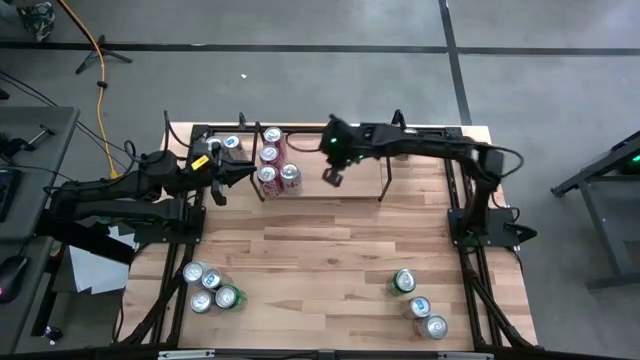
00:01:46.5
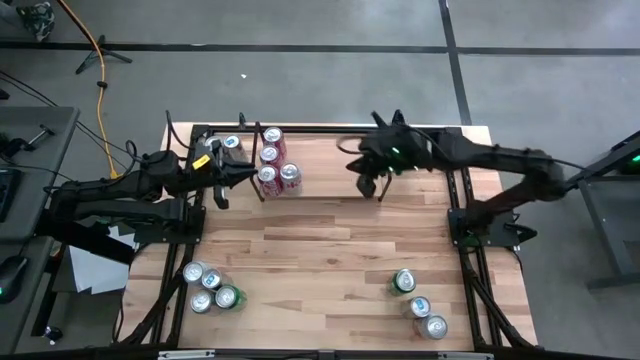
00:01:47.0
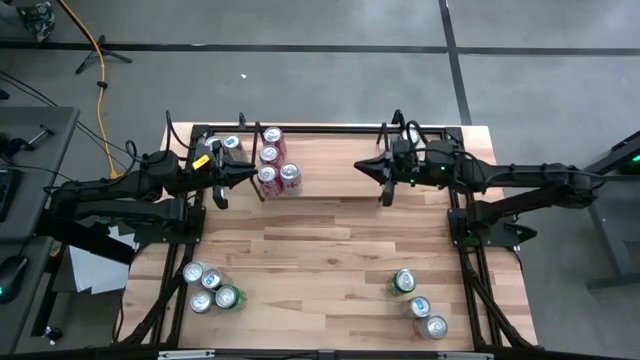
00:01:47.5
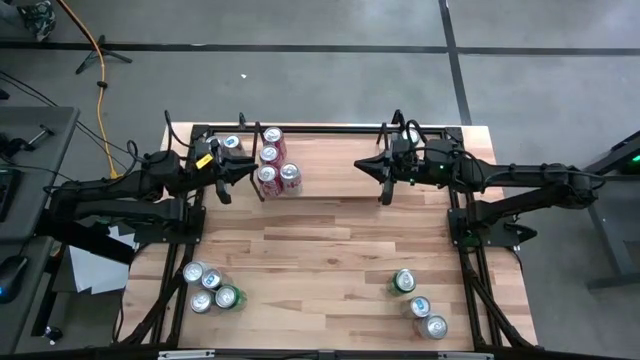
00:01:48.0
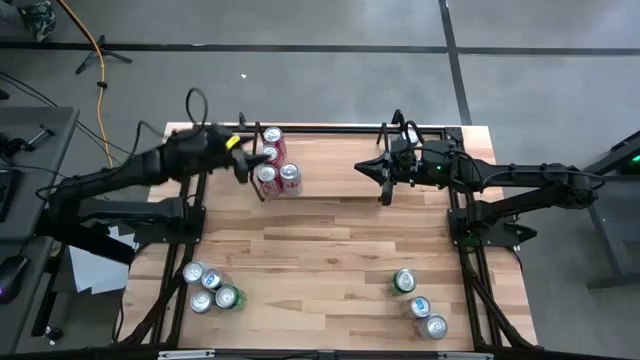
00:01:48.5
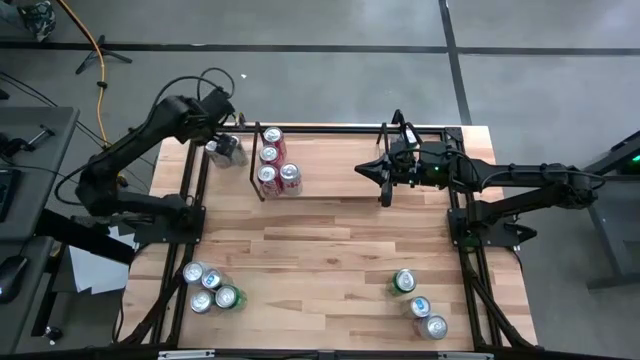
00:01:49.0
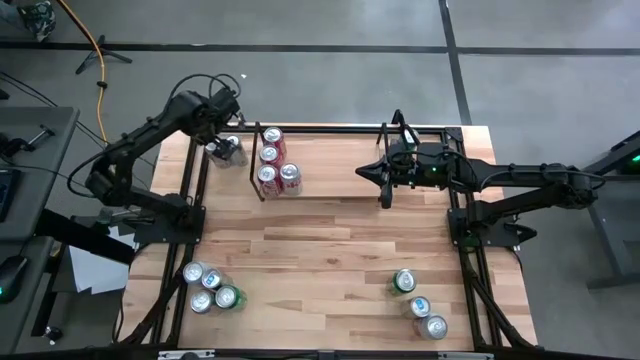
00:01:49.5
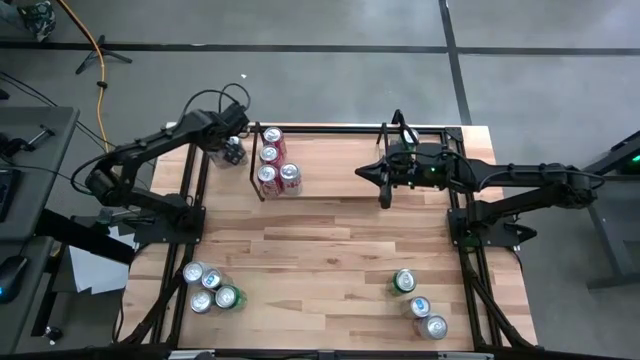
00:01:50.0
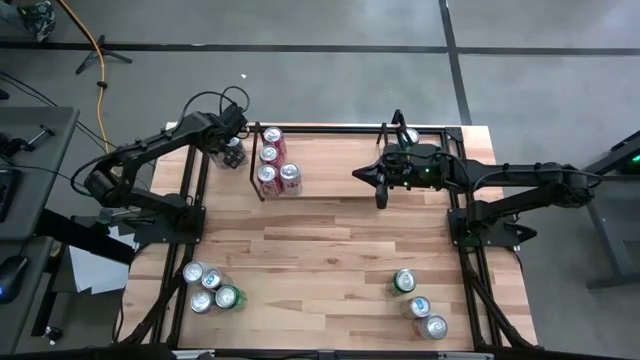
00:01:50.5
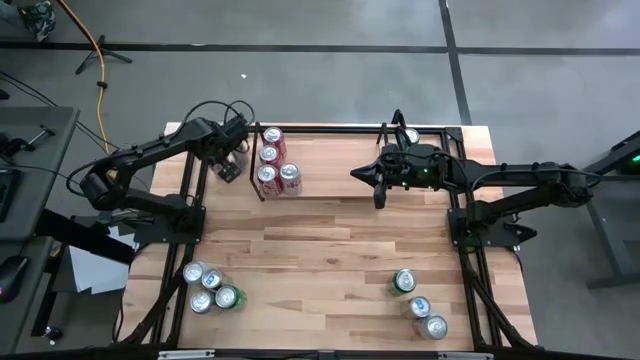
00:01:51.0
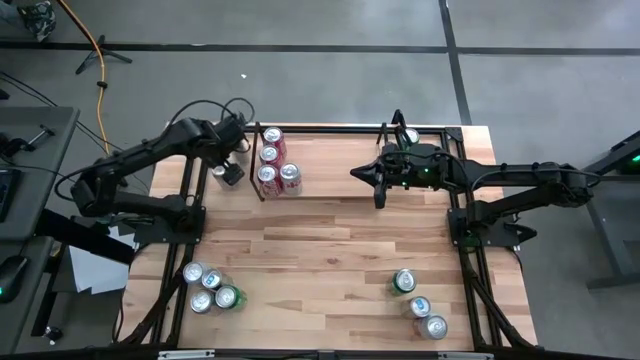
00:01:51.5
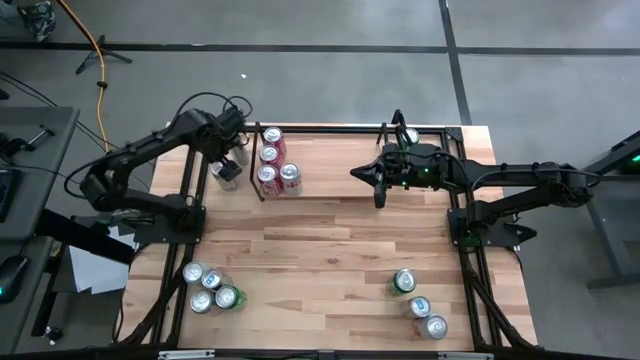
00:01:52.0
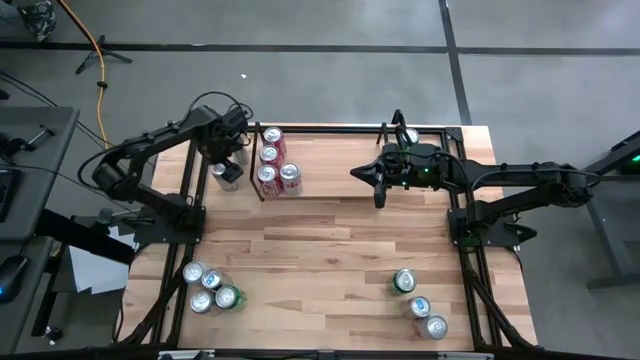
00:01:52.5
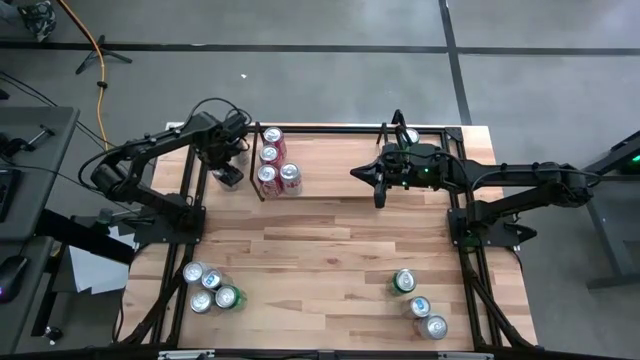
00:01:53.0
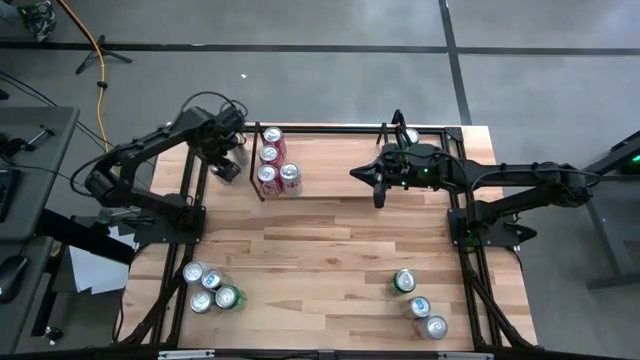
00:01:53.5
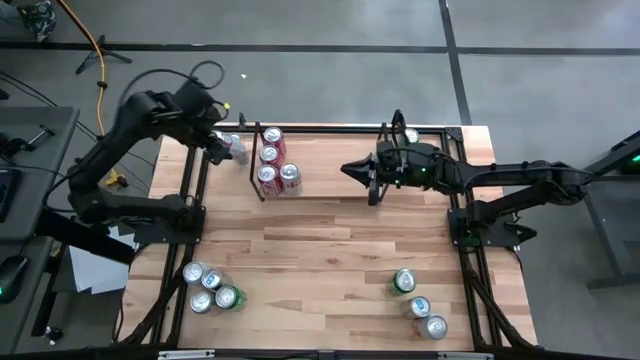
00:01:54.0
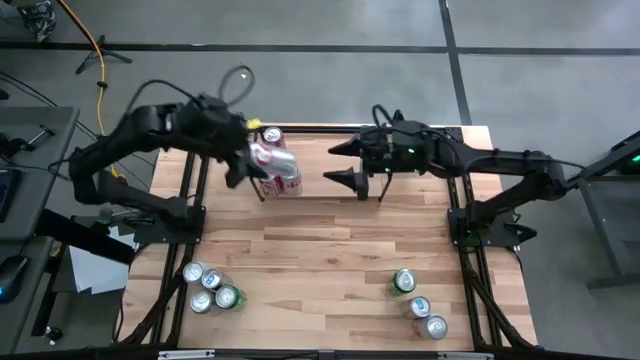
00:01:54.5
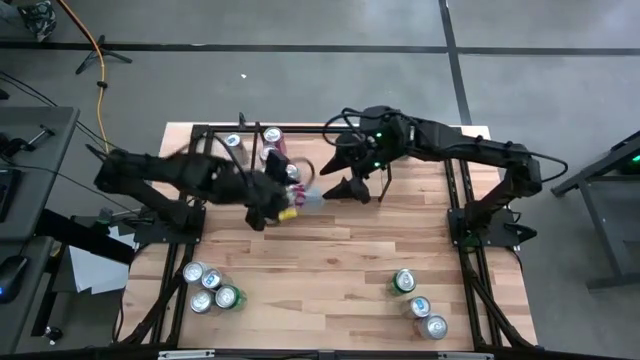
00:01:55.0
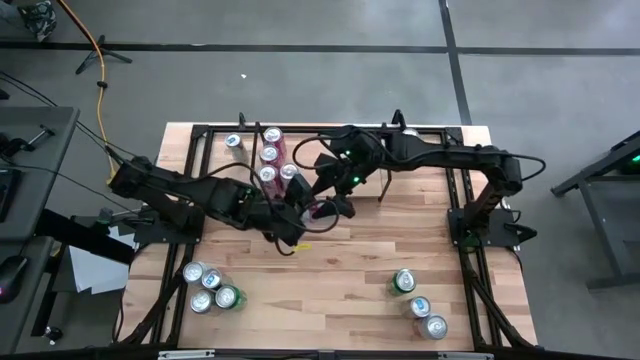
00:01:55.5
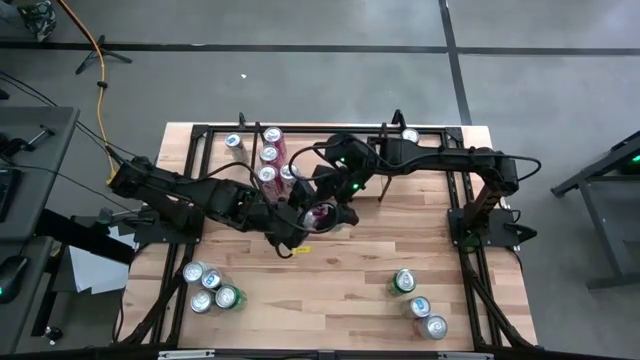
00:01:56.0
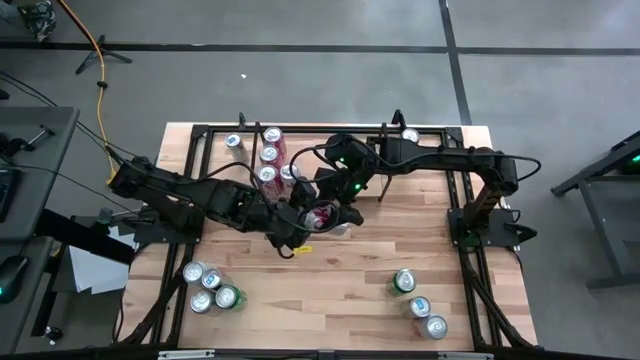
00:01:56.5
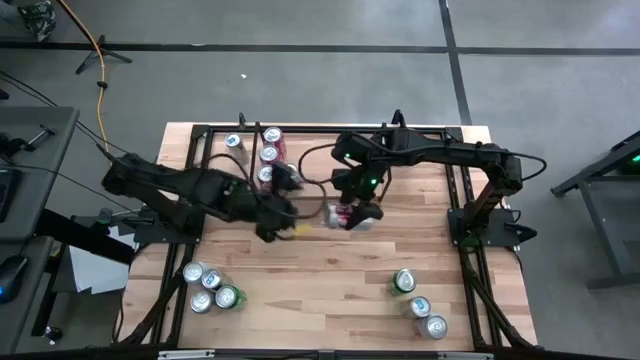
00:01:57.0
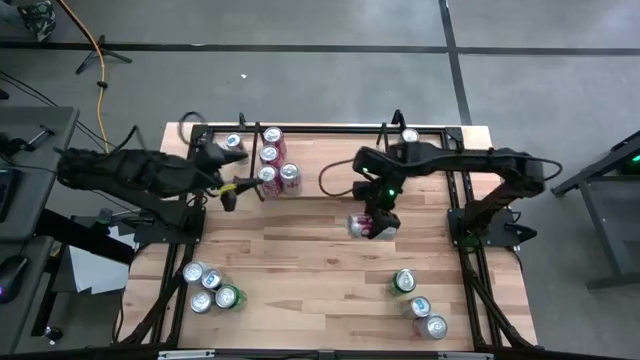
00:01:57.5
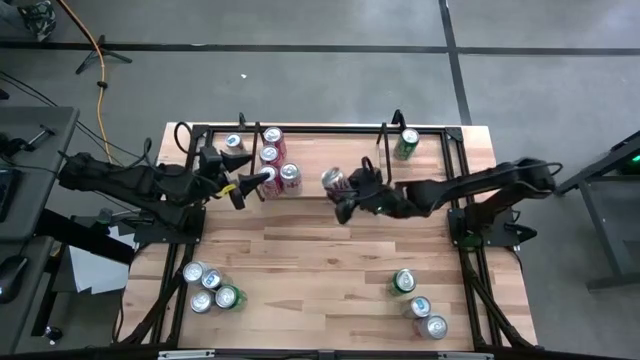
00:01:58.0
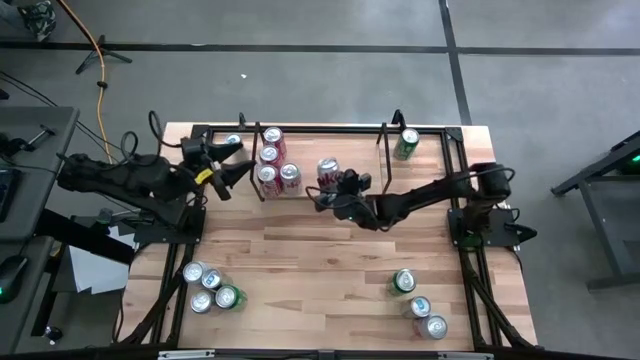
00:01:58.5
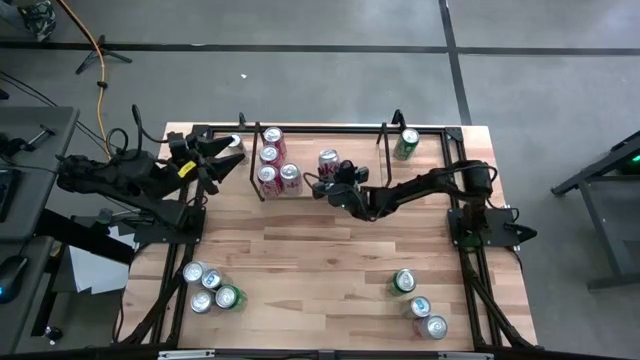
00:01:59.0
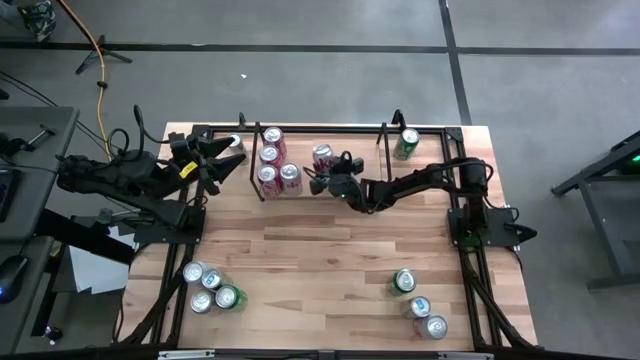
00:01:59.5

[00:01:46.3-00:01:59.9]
Task: Place canned beverage on shelf
Put the top silver soda can on the shelf aligned with the other silver soda can

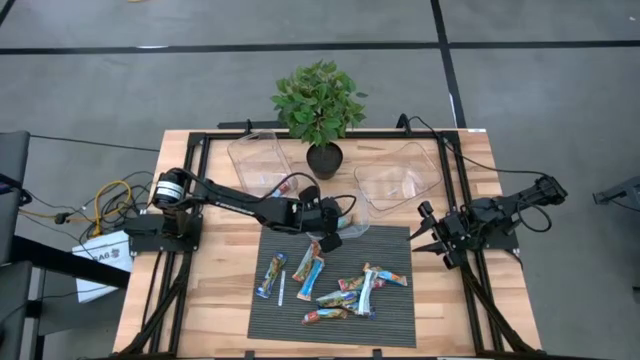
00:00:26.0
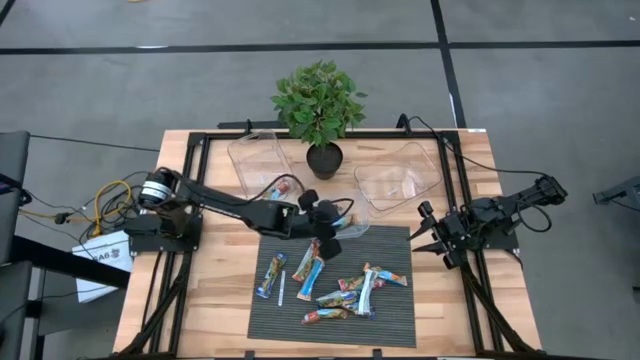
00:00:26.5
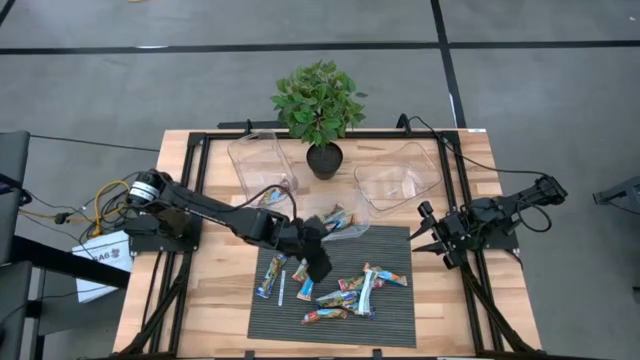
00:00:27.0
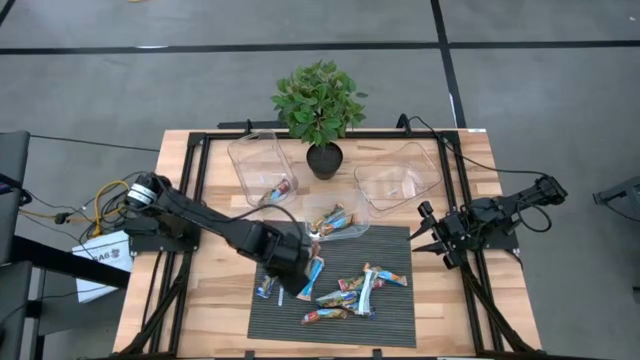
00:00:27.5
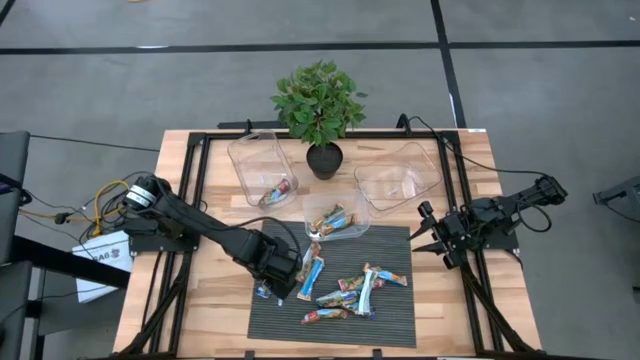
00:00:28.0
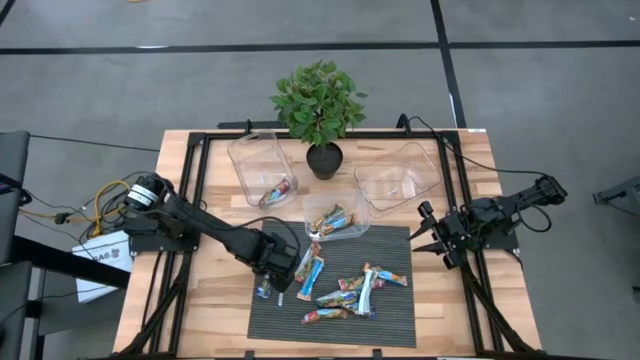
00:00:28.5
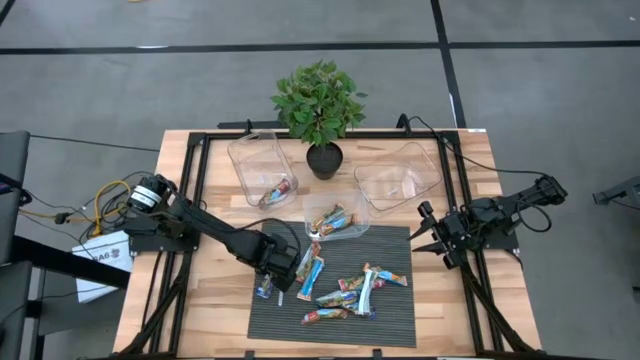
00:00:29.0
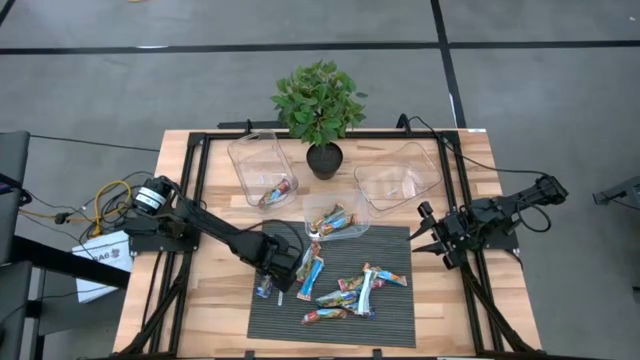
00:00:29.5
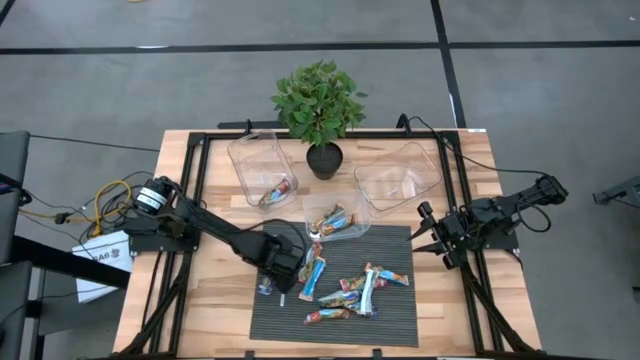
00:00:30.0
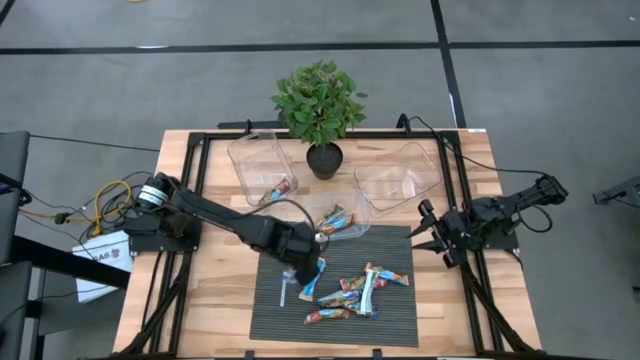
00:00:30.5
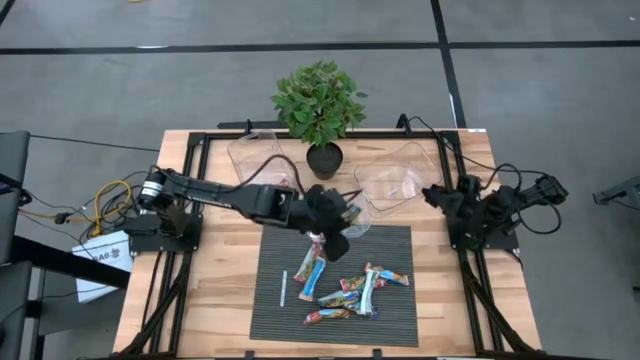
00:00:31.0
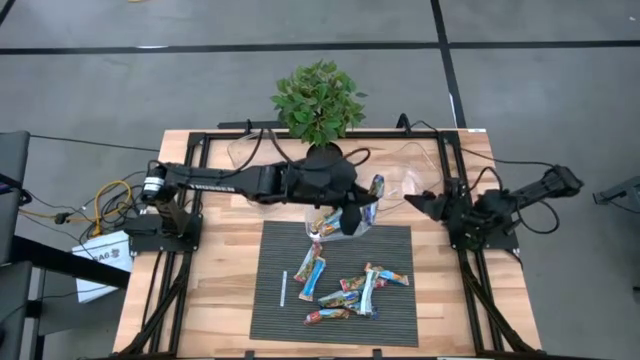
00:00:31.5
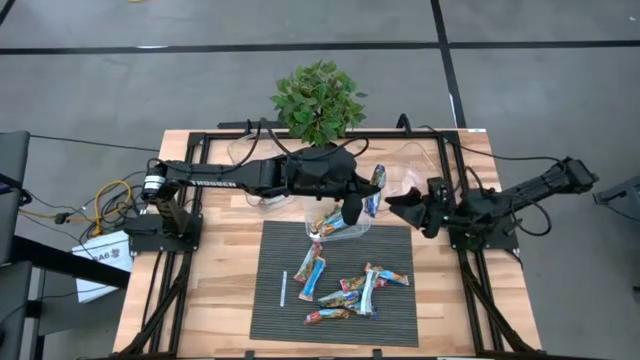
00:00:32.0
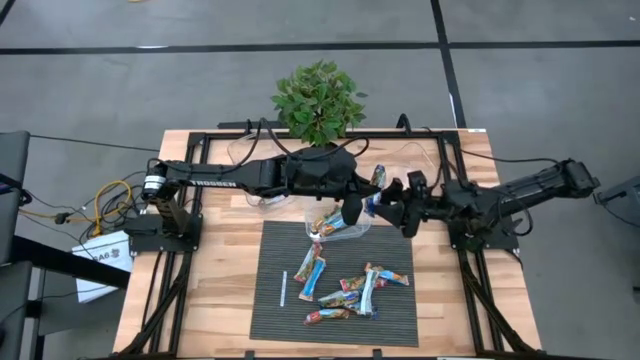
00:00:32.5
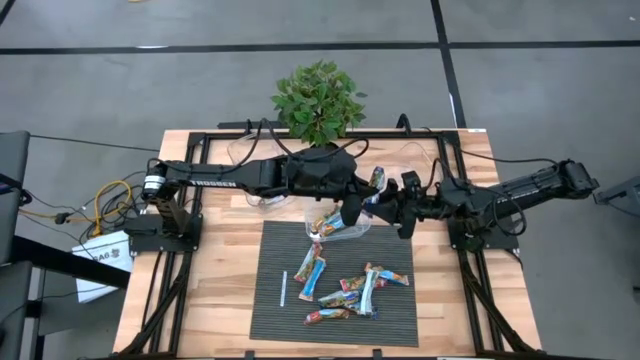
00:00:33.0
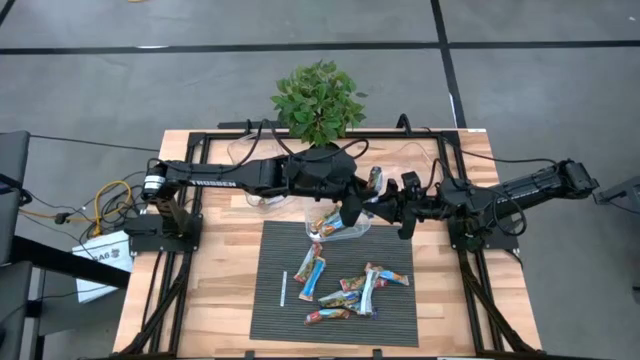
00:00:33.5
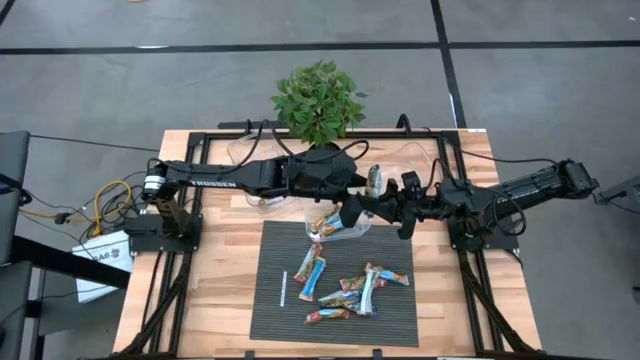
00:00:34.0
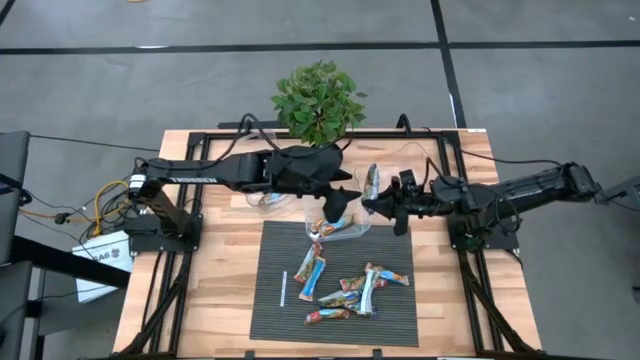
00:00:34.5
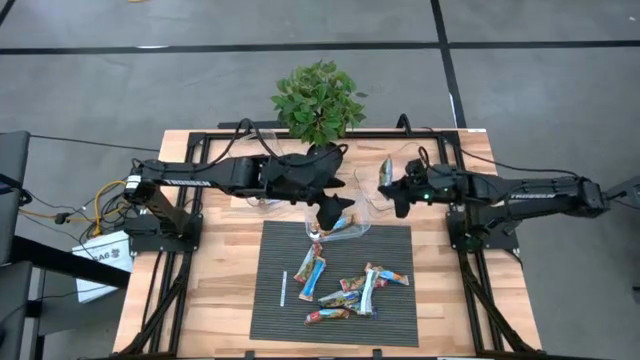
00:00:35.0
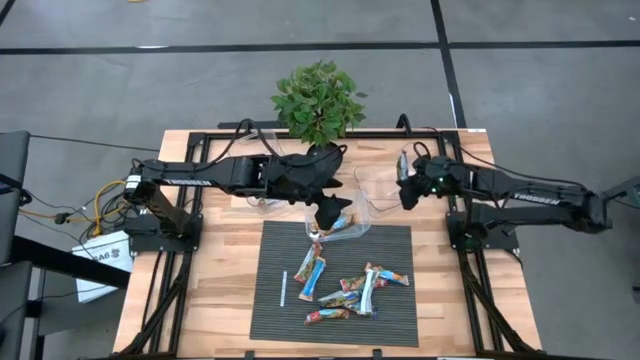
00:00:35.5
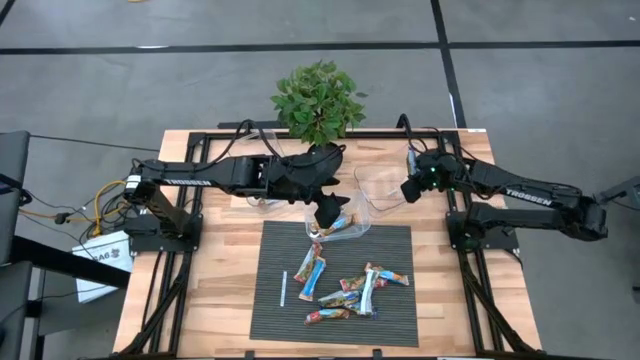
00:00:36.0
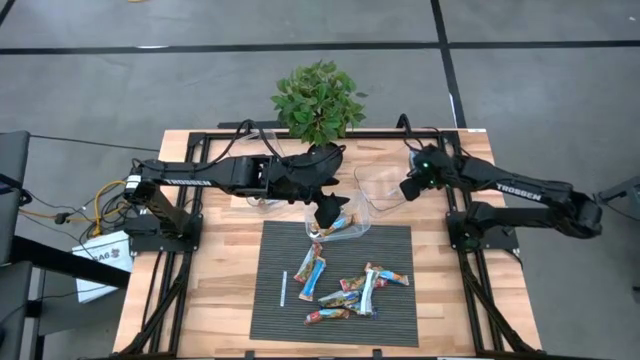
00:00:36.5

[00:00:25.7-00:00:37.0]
Task: Pick and place Granola Bars by type
Put the violet granola bar into the right transparent bin
